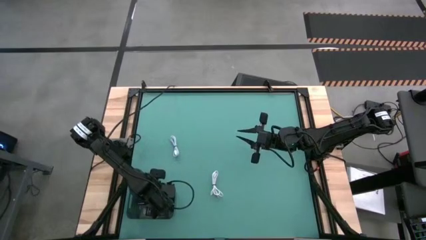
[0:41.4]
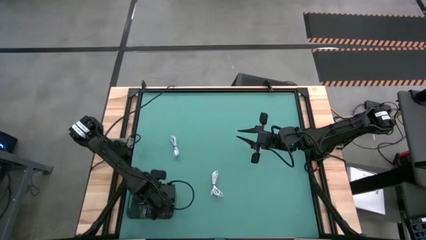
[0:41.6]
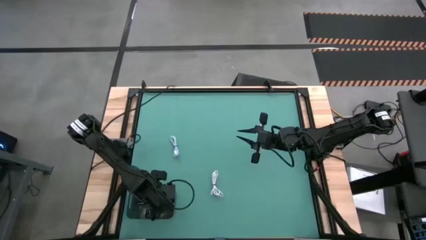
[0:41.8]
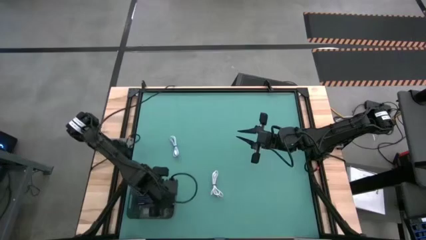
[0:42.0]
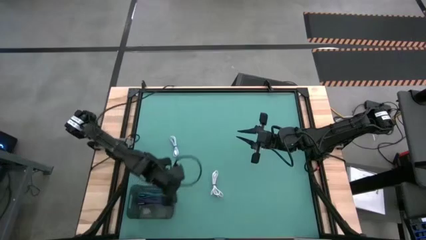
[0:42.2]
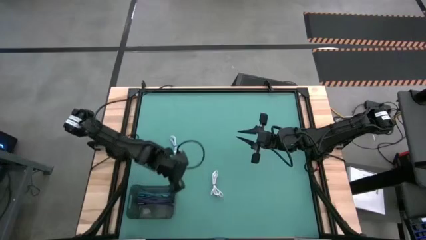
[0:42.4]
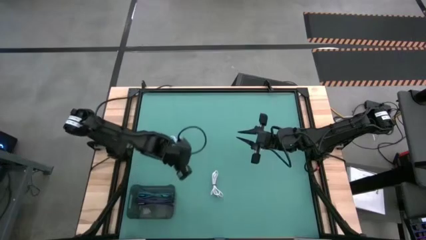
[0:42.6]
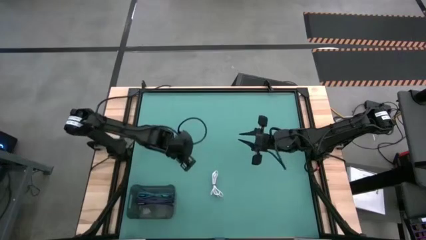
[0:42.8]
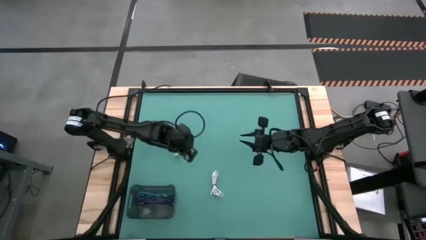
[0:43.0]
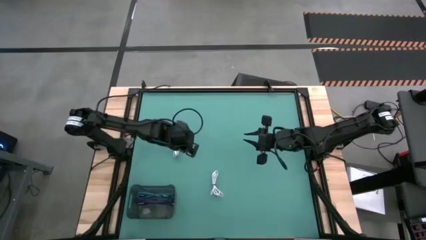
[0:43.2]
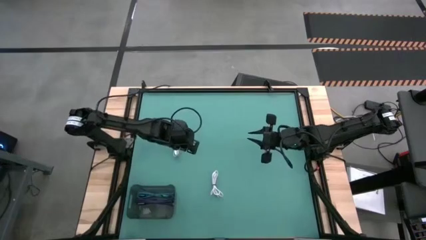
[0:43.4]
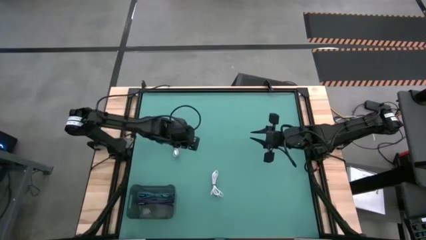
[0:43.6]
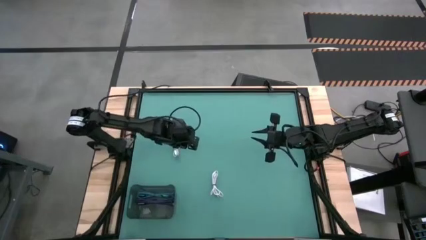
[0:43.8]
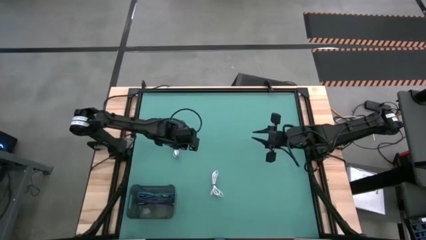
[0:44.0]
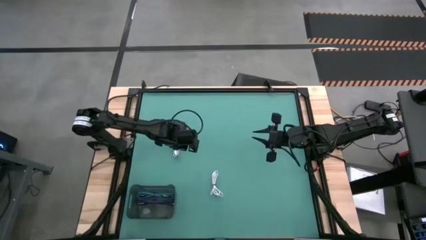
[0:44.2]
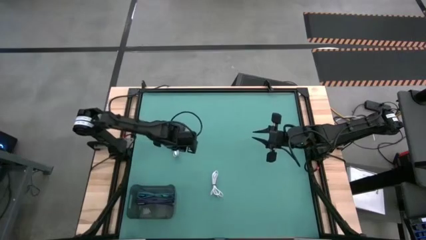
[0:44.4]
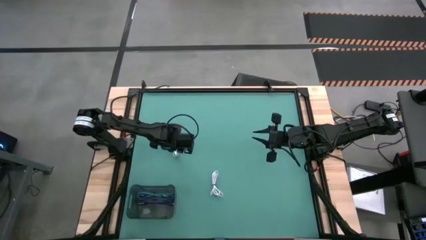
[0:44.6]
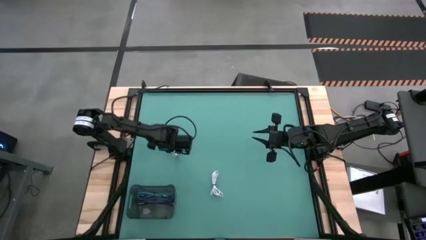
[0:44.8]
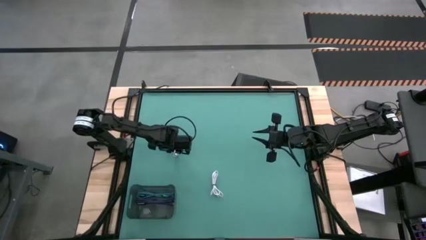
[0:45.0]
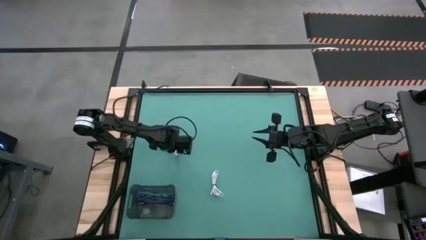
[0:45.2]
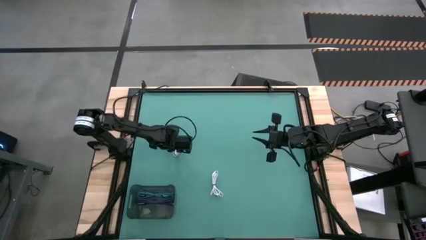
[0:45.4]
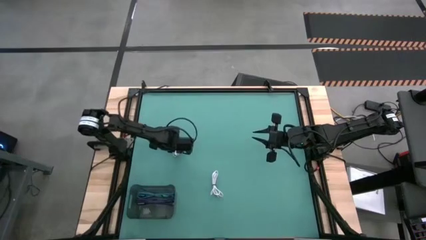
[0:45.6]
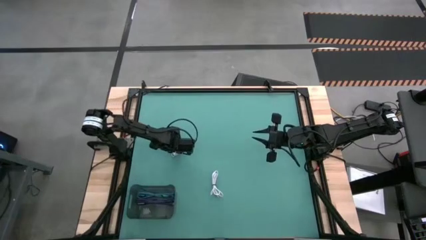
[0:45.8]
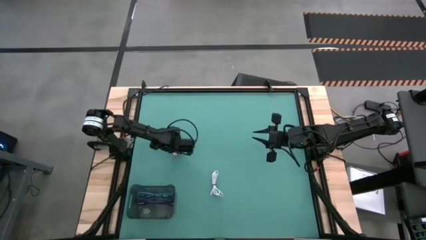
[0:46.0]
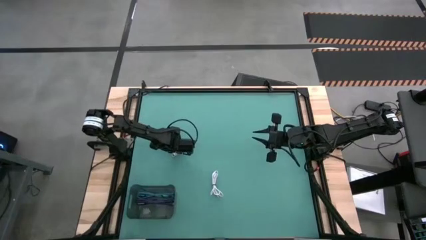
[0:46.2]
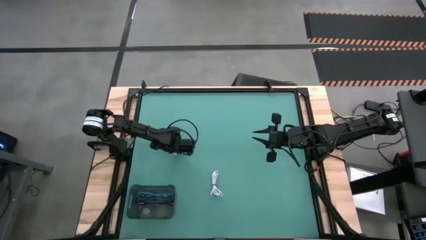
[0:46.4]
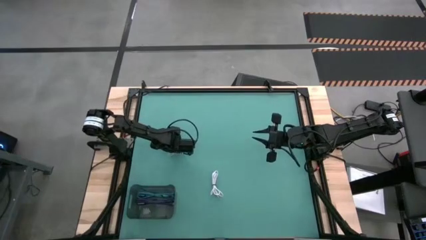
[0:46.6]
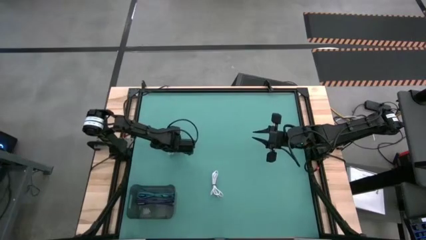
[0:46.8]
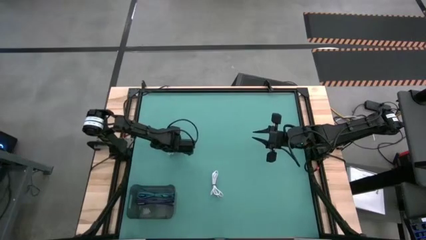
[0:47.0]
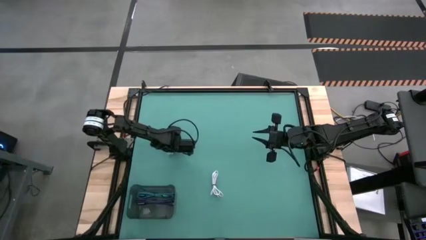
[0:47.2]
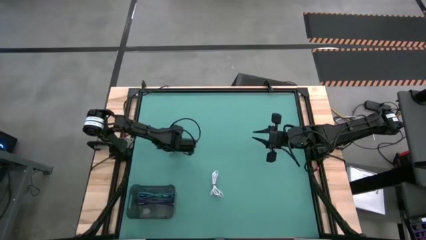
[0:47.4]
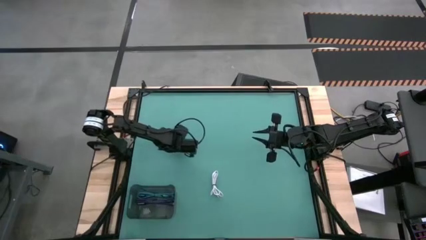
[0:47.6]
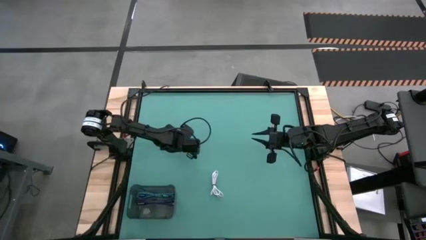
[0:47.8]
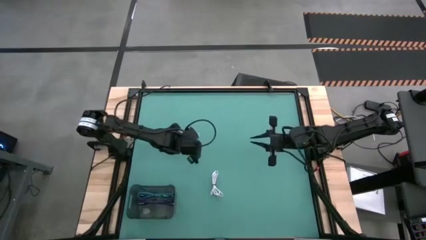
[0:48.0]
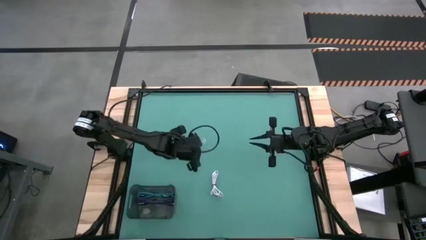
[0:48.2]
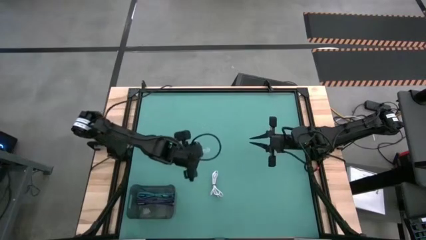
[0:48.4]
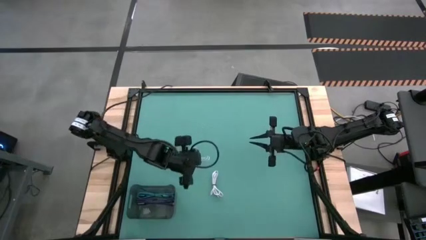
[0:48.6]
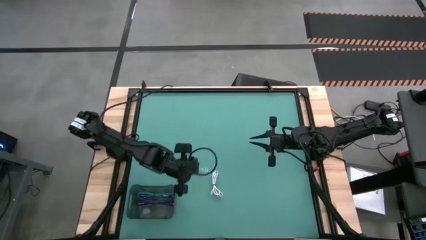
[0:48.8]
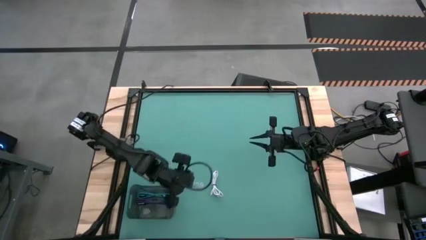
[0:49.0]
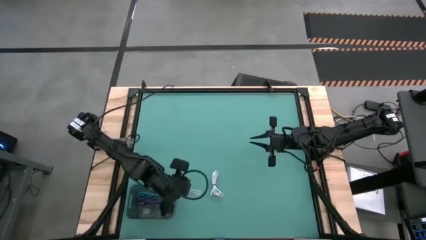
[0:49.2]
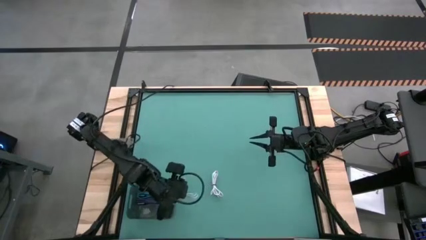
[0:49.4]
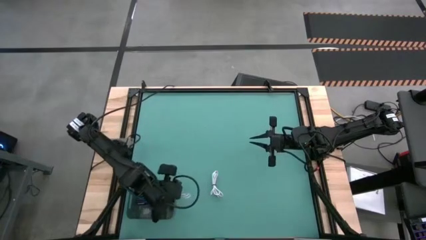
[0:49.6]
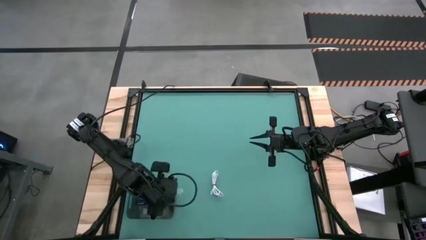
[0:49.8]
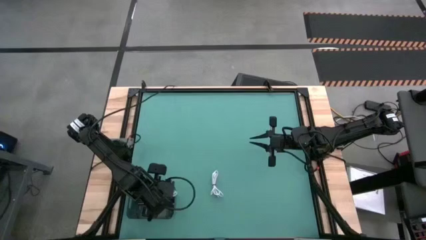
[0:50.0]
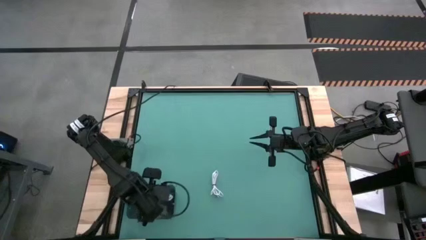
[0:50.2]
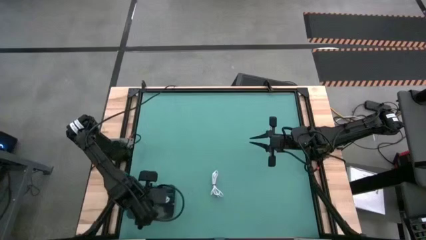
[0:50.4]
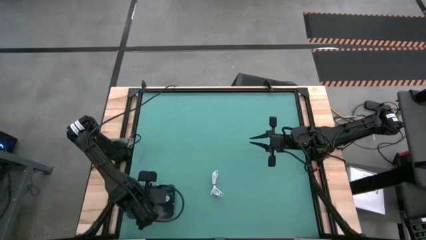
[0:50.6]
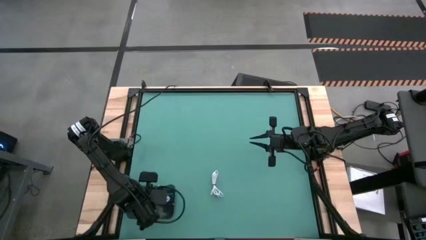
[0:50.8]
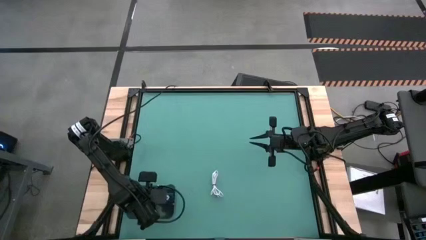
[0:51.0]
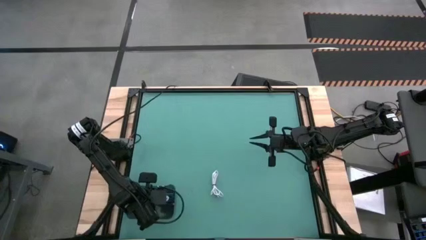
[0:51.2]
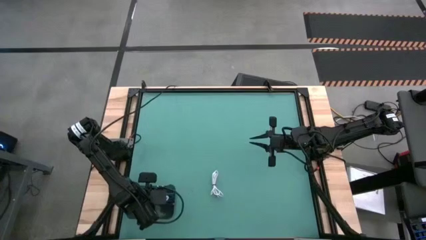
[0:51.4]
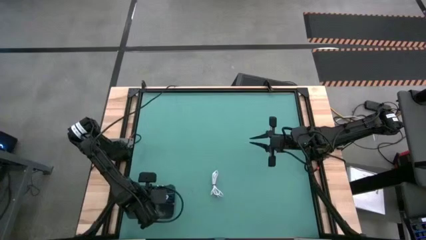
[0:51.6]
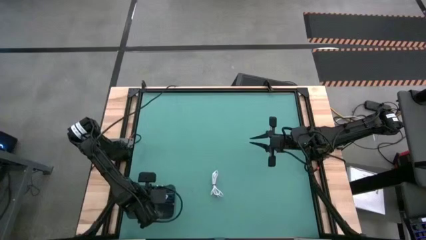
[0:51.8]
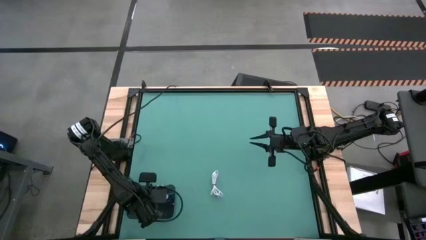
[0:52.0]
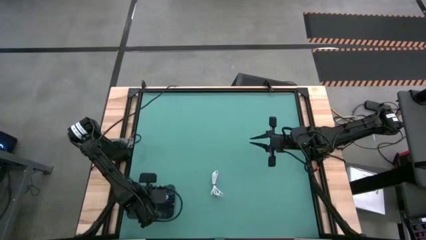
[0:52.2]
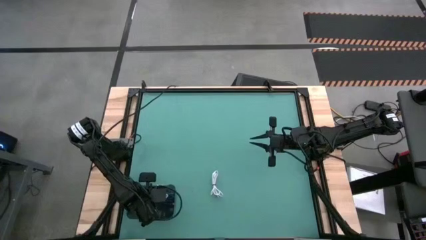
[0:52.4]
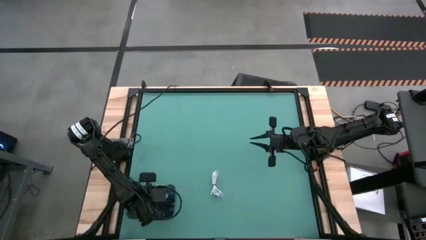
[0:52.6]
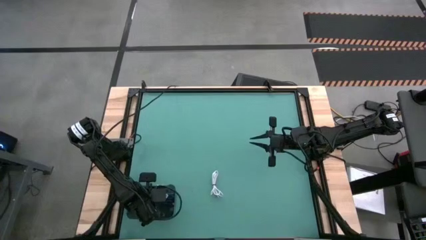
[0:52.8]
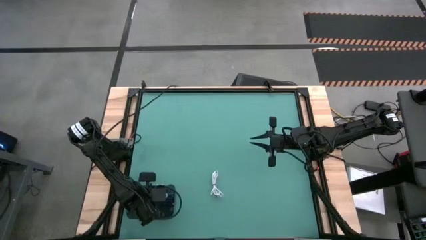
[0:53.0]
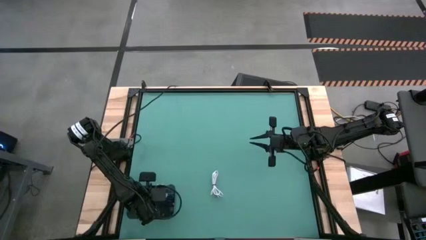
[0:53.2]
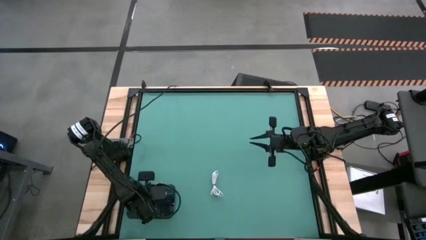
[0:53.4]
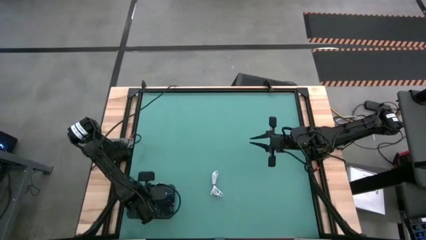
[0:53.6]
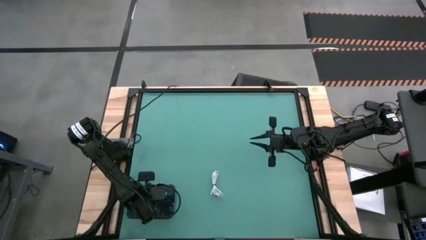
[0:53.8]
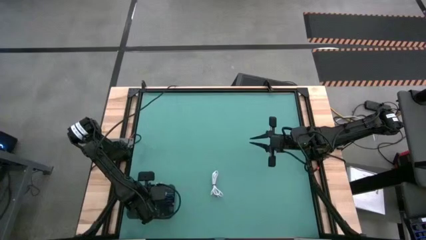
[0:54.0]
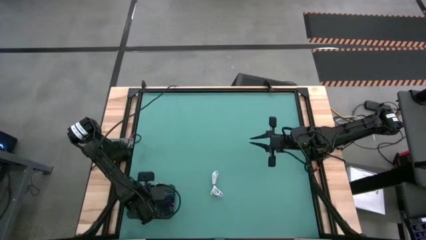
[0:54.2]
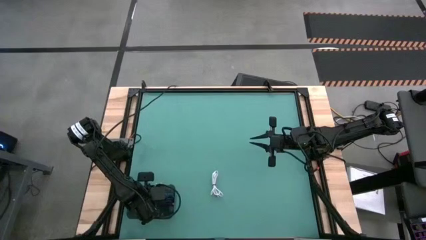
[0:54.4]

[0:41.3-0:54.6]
Task: Pick and place USB-C Cables
Put the top white charger cable into the black bin
